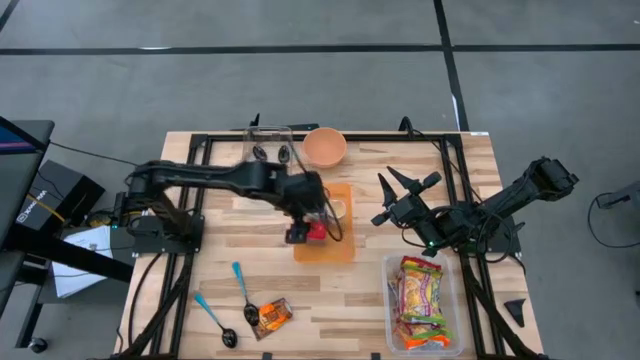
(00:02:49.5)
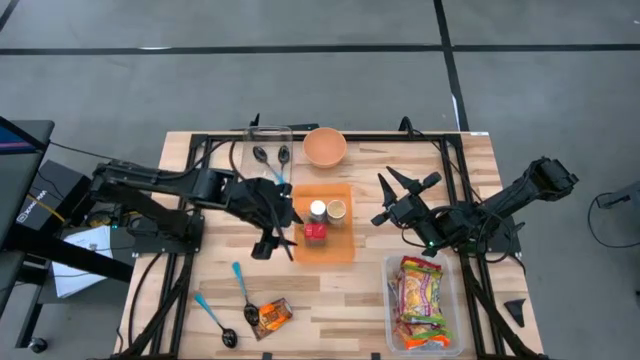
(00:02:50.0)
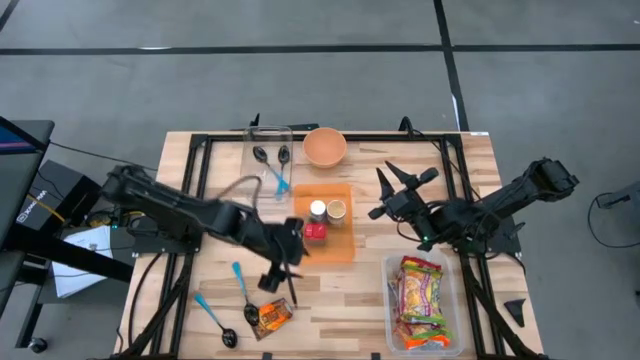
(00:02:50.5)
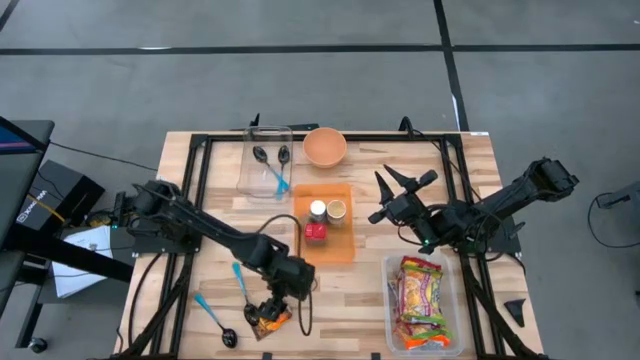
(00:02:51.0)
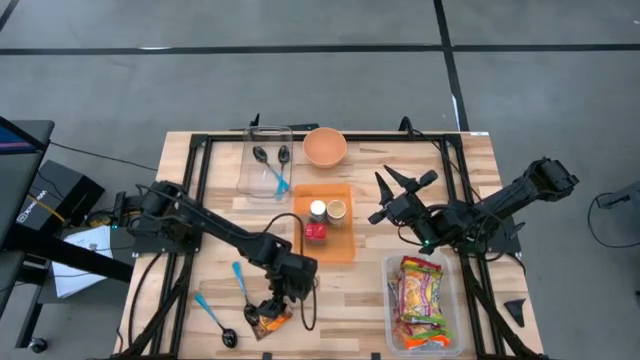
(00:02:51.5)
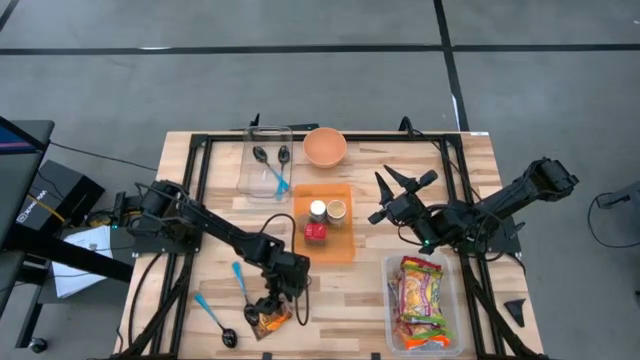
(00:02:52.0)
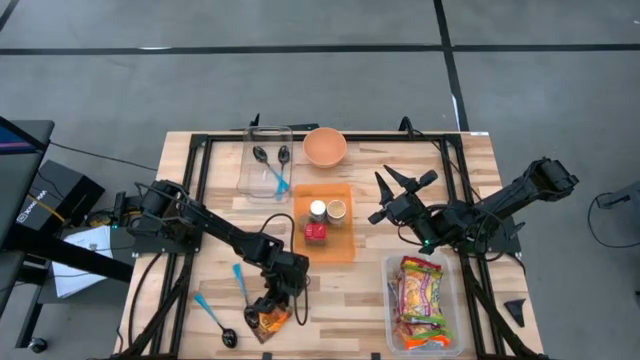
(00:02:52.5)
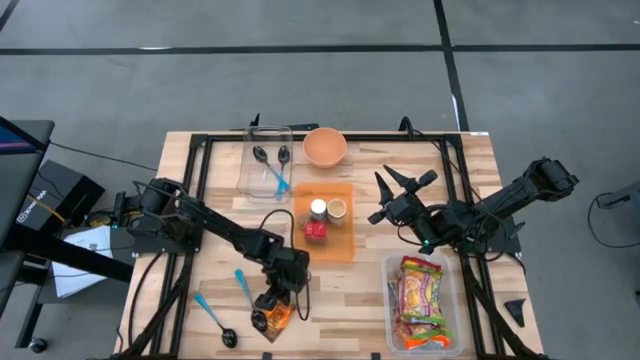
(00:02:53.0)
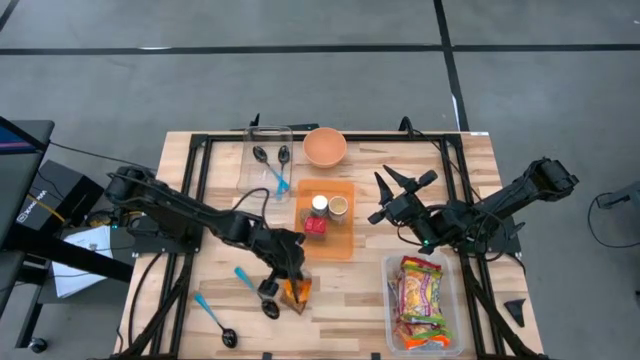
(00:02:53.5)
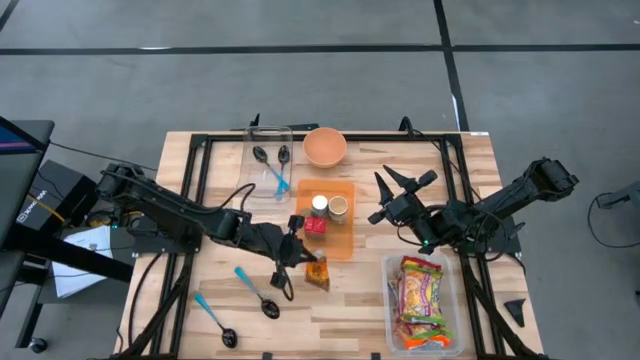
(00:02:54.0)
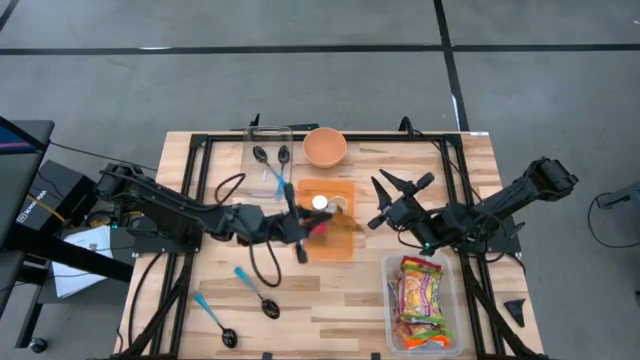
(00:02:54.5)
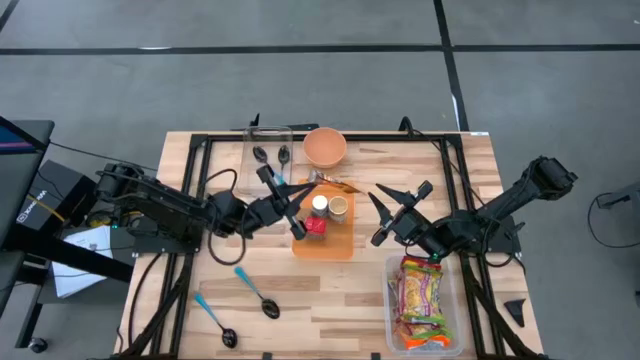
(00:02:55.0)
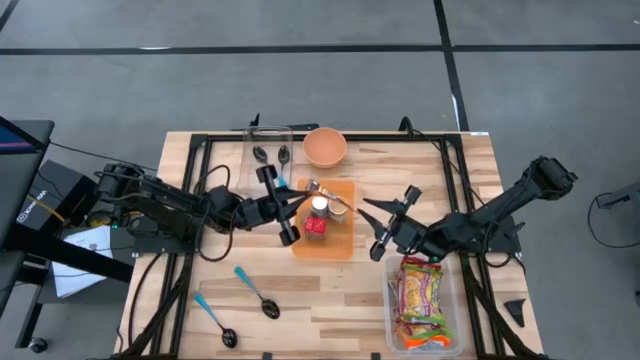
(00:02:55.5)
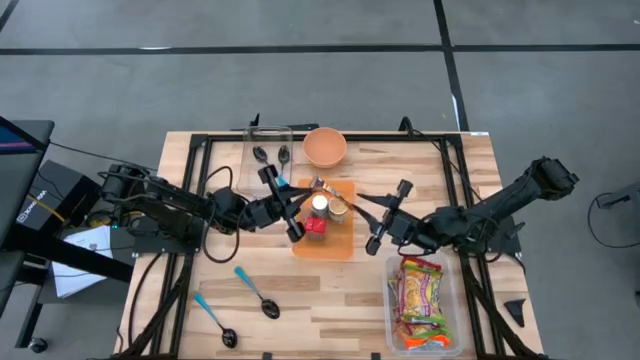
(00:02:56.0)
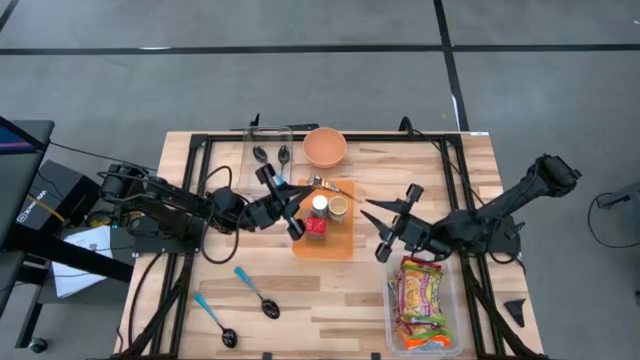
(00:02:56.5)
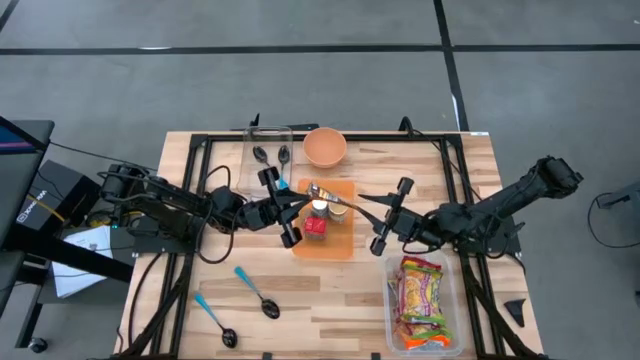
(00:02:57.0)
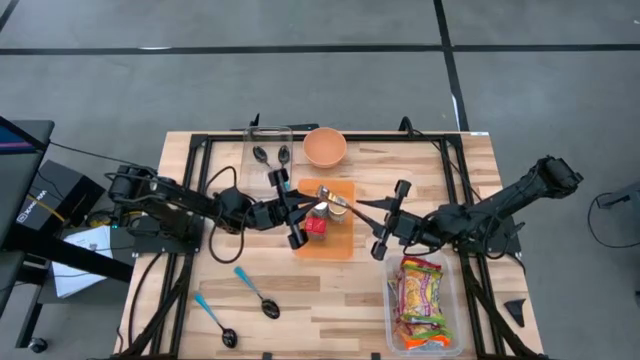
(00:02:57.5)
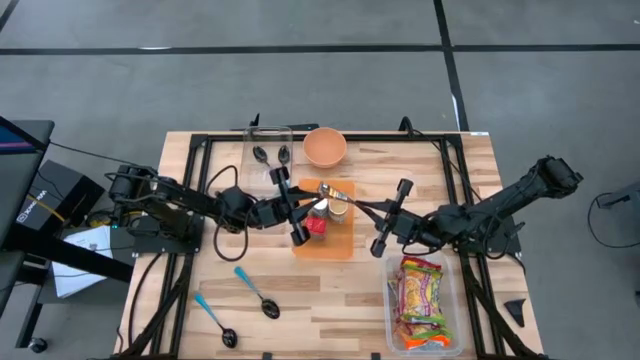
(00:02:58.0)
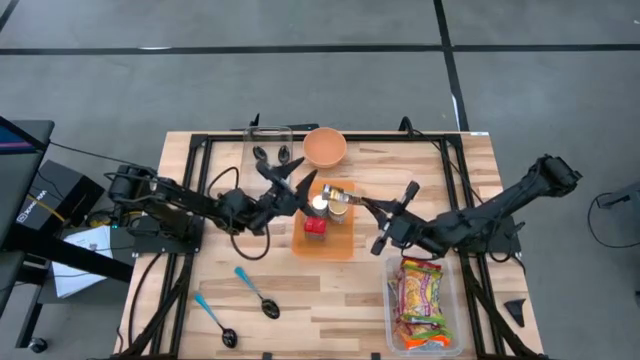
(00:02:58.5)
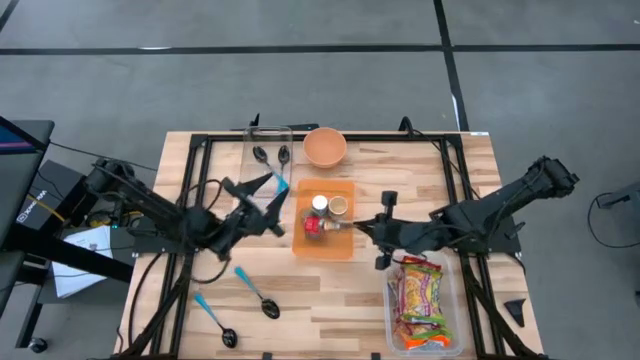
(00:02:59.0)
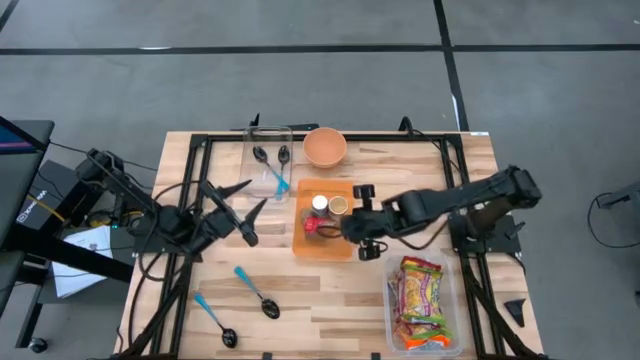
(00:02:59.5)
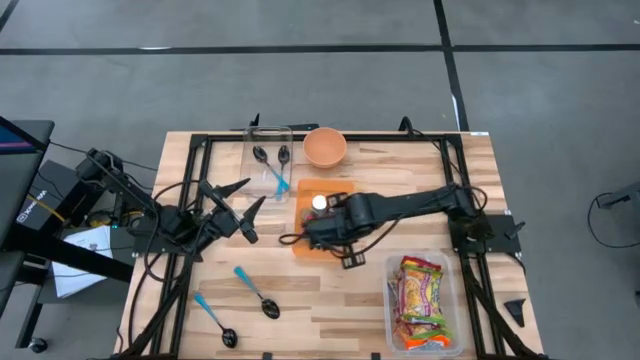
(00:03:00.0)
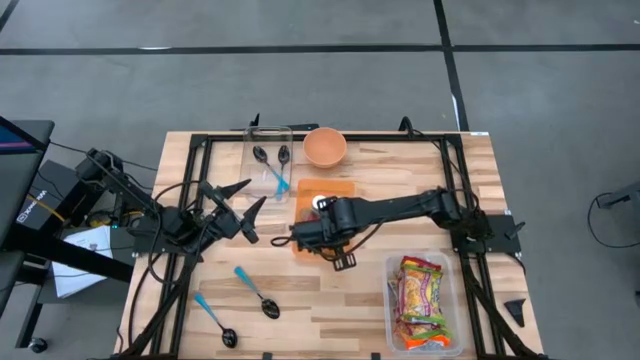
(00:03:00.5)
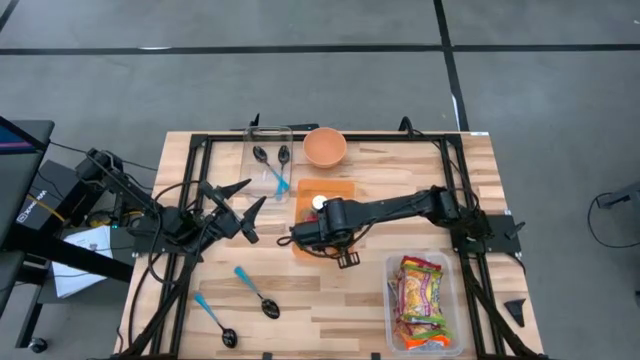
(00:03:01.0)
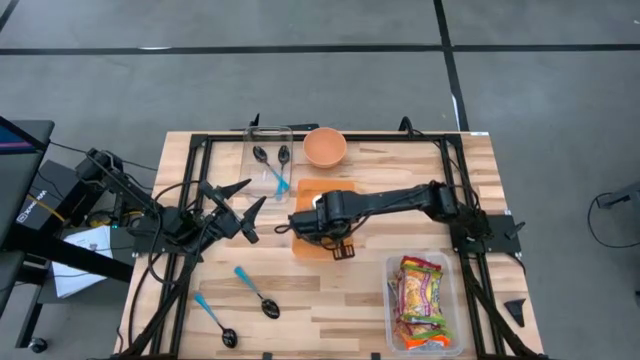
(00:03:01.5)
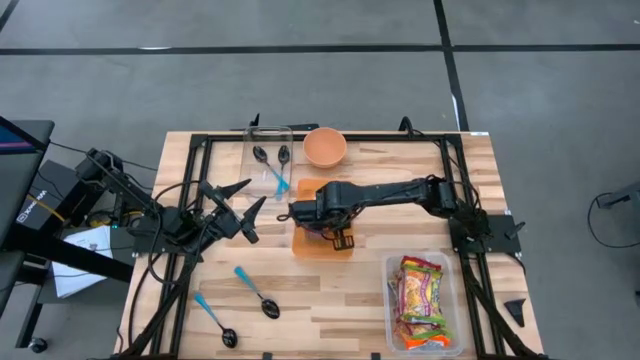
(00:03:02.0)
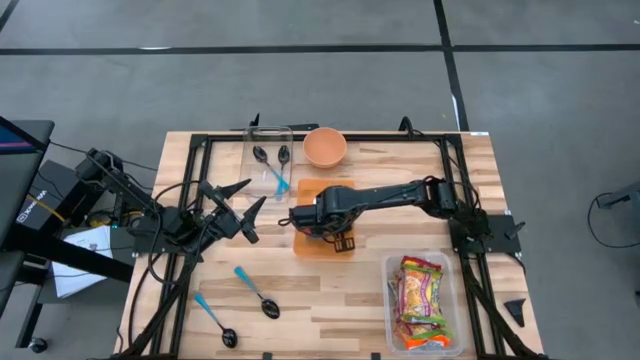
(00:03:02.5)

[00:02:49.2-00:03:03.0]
Task: Pick & Place Food Item
Put the orange seasoning pack into the orange bin

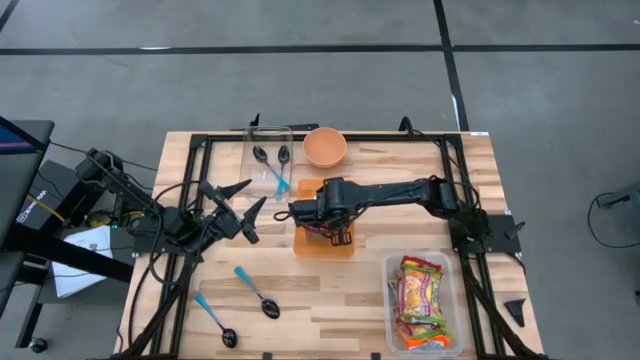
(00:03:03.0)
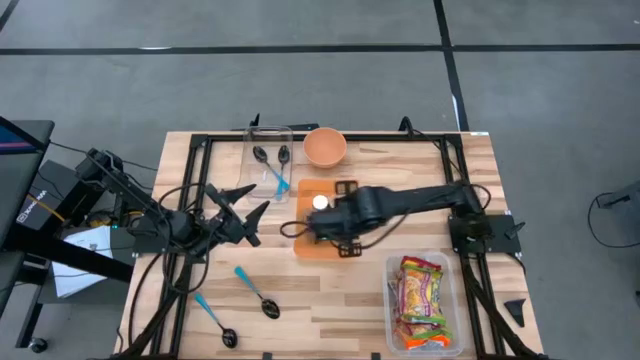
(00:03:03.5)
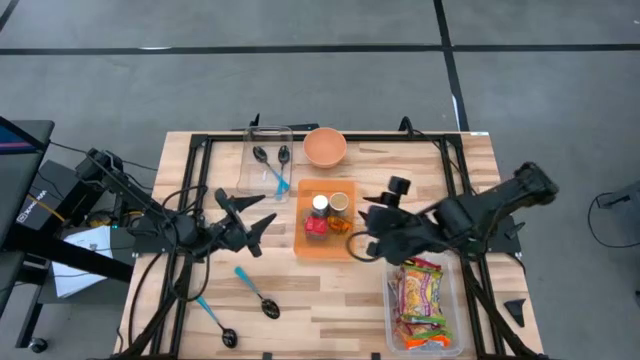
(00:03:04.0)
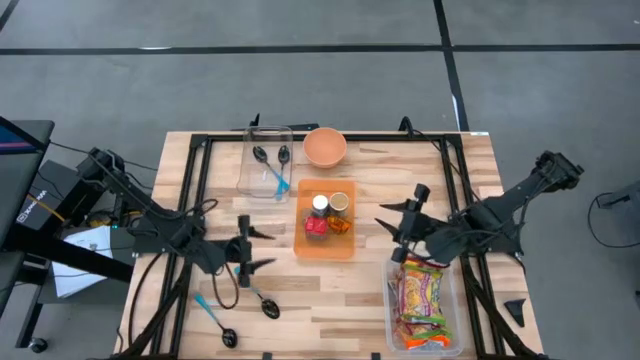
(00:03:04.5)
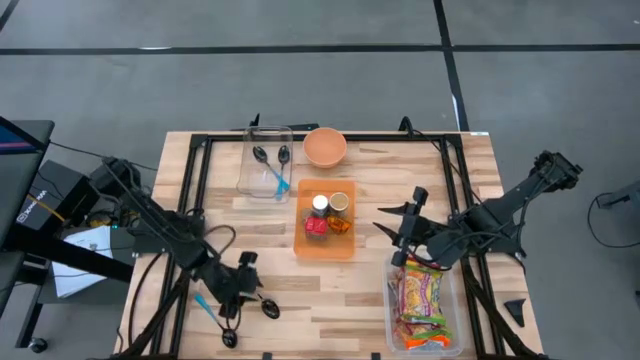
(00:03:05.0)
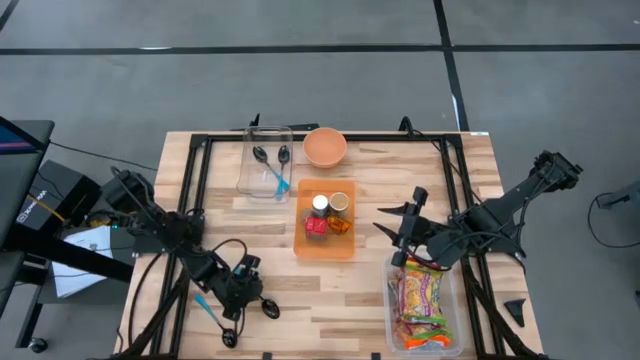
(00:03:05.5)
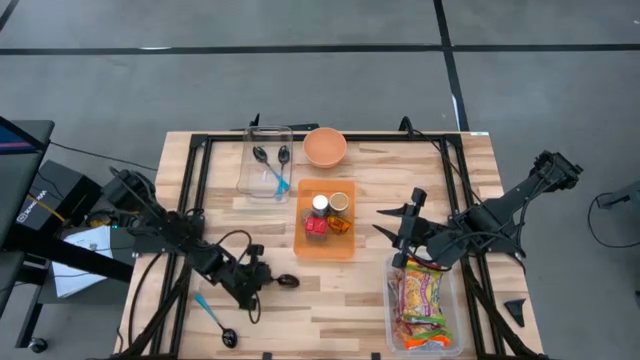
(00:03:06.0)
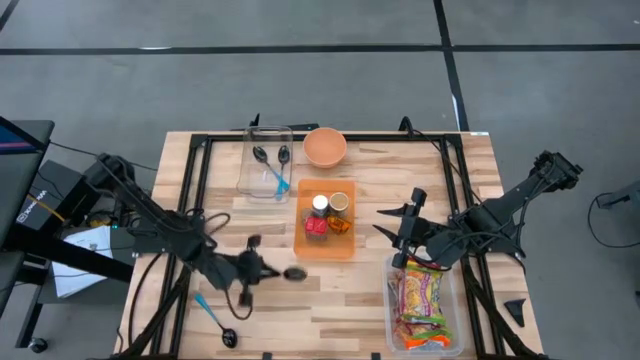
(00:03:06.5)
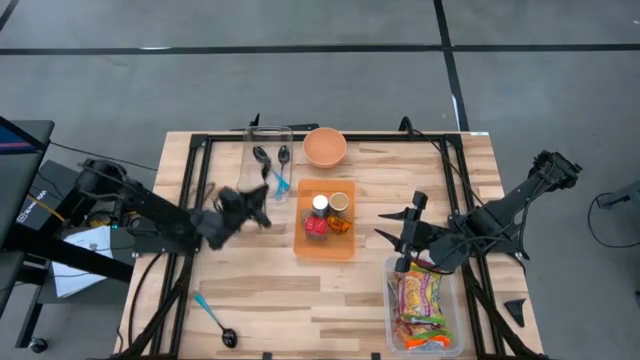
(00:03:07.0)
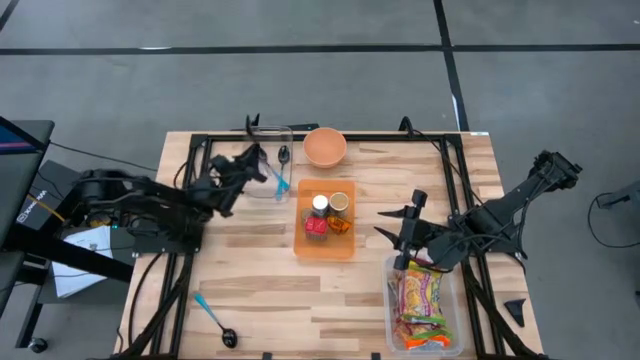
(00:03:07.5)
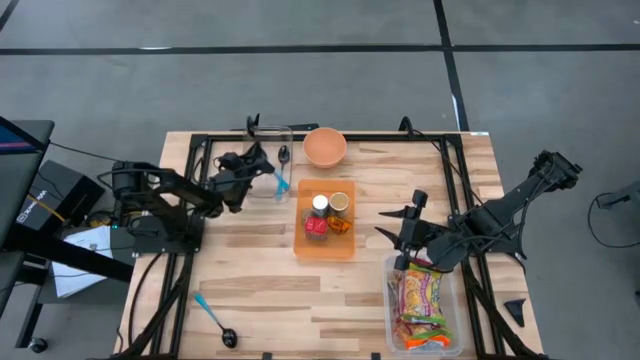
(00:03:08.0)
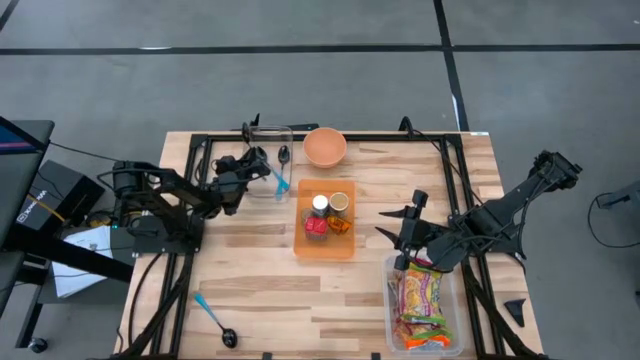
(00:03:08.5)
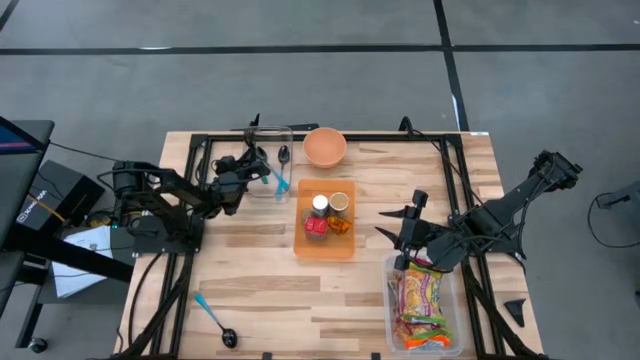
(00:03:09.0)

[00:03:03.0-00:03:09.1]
Put the blue spoon into the transparent bin
